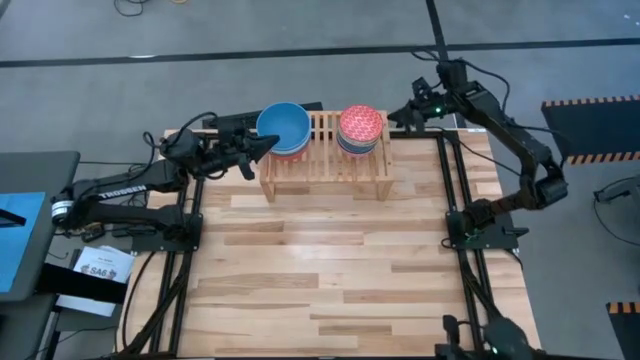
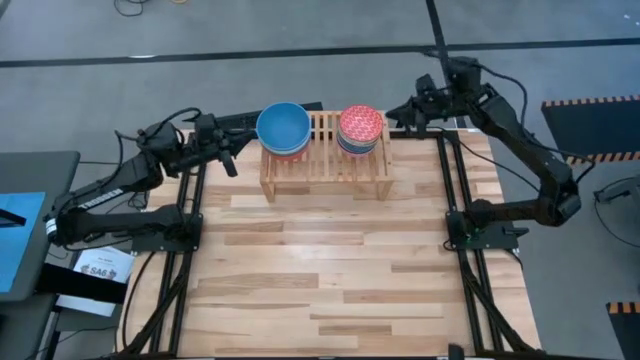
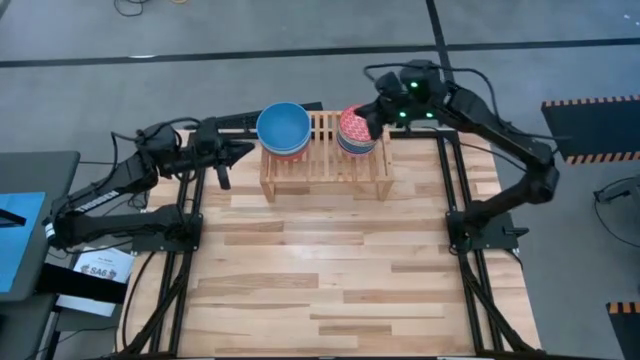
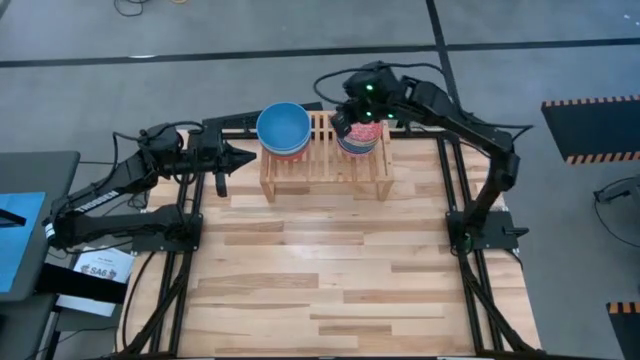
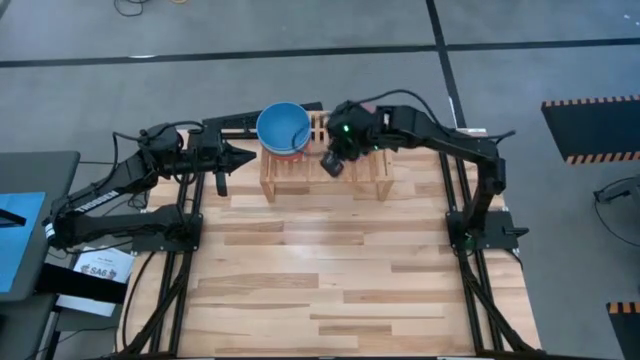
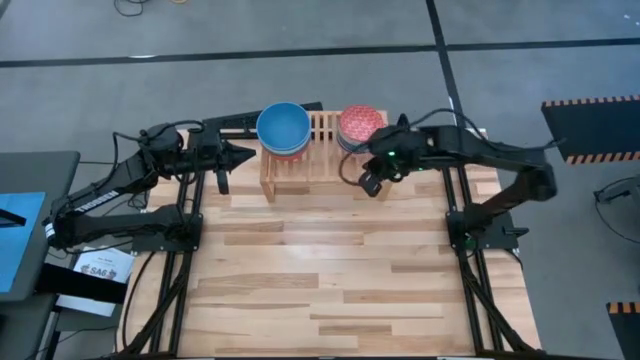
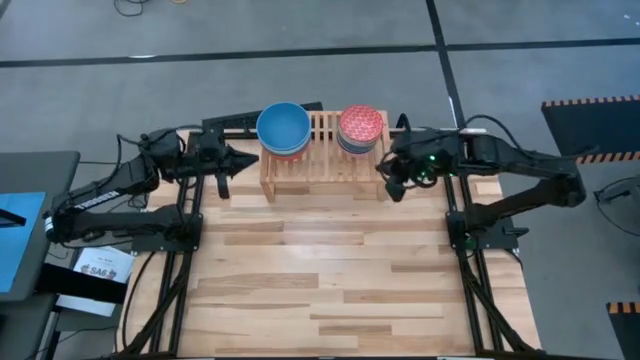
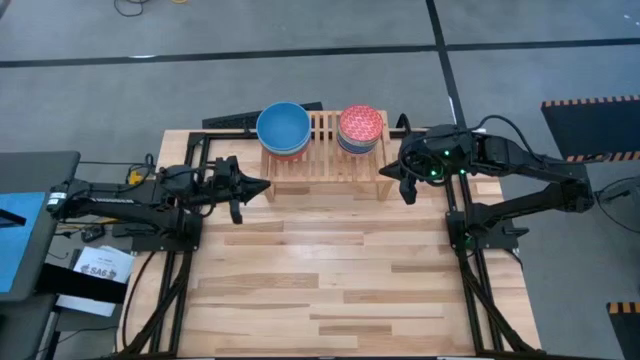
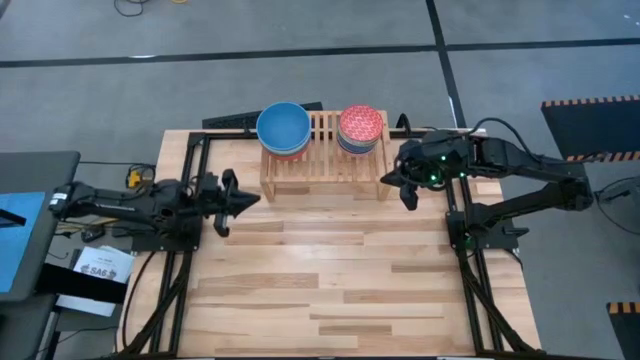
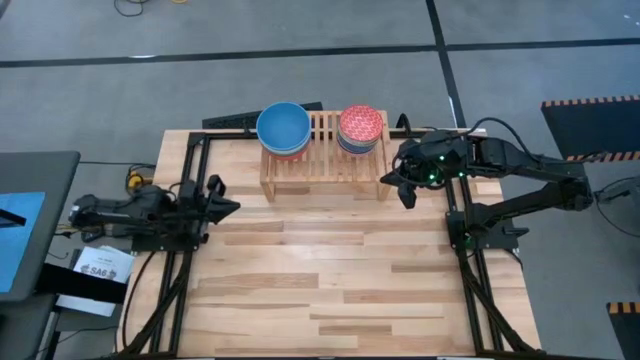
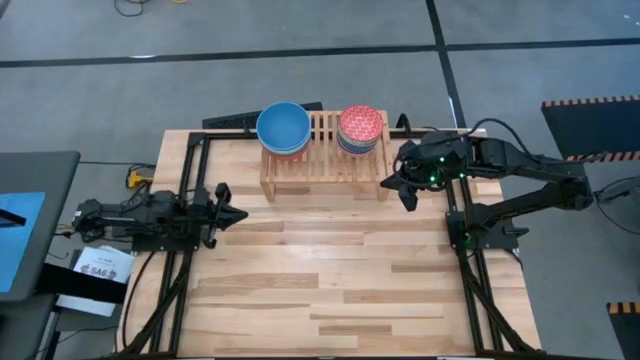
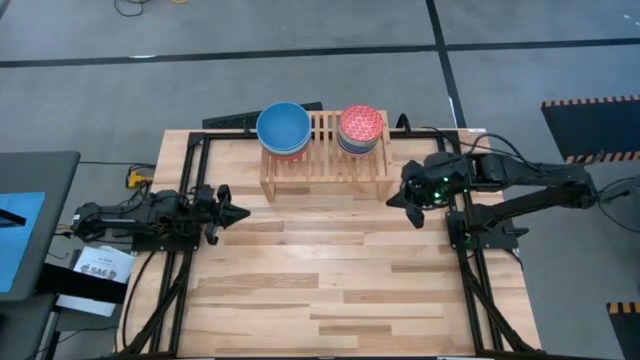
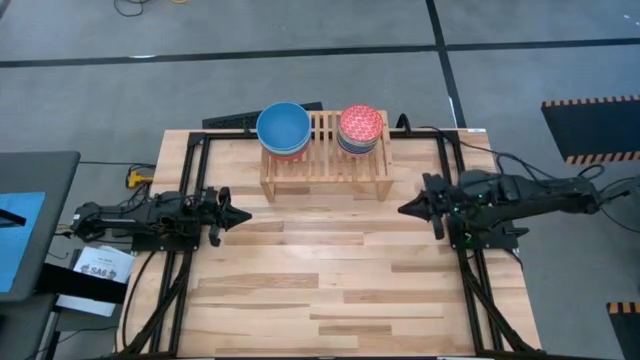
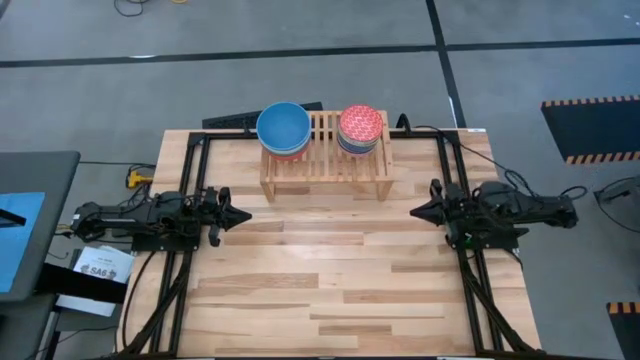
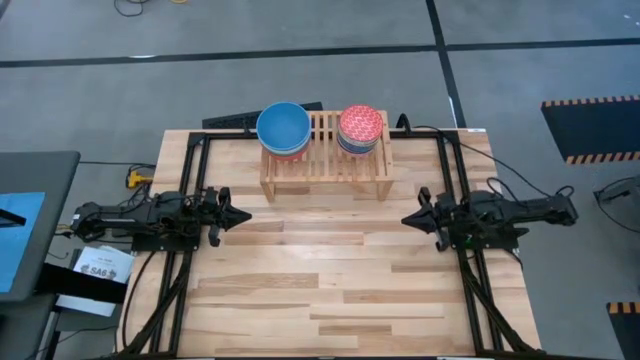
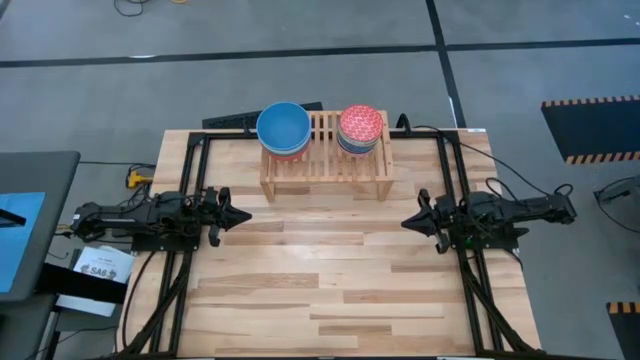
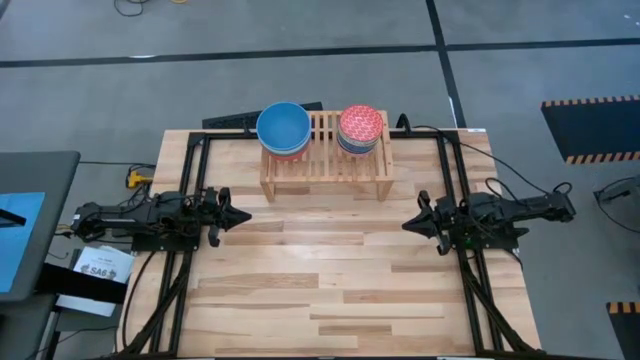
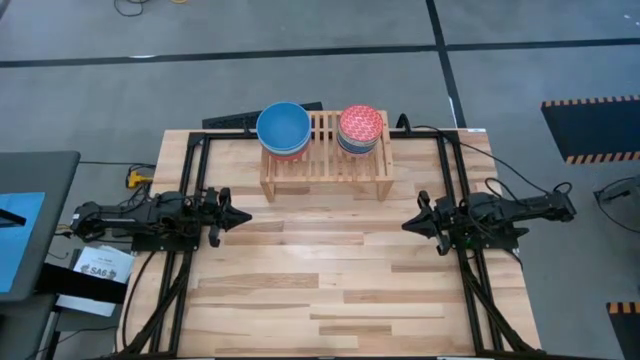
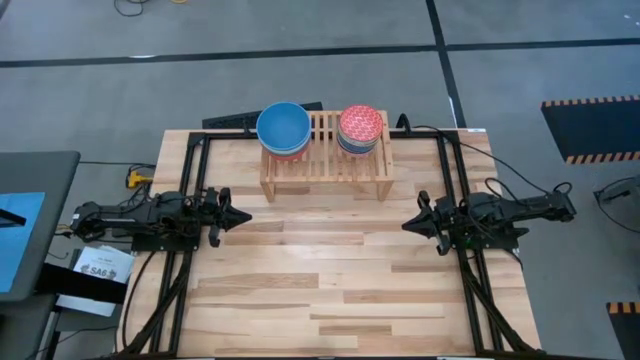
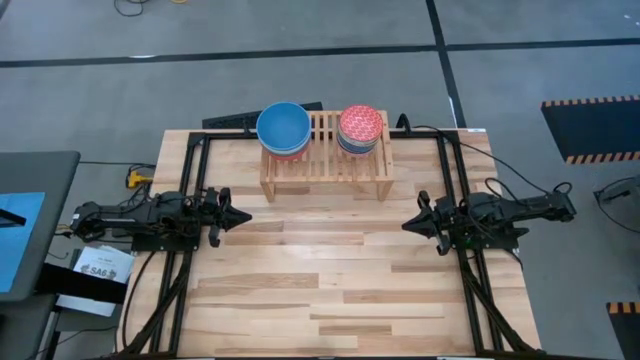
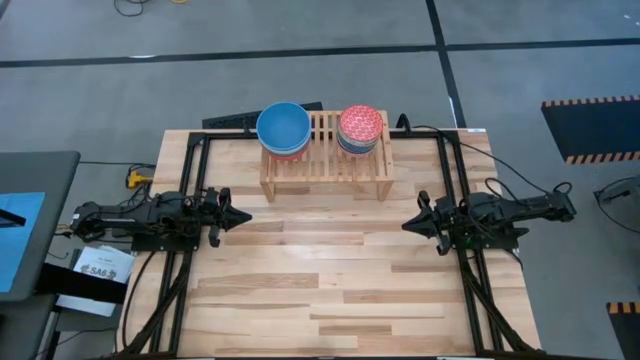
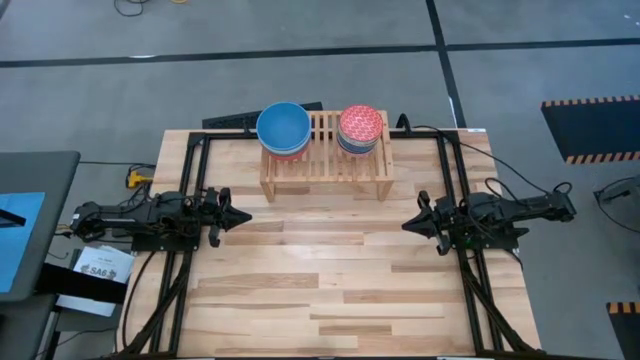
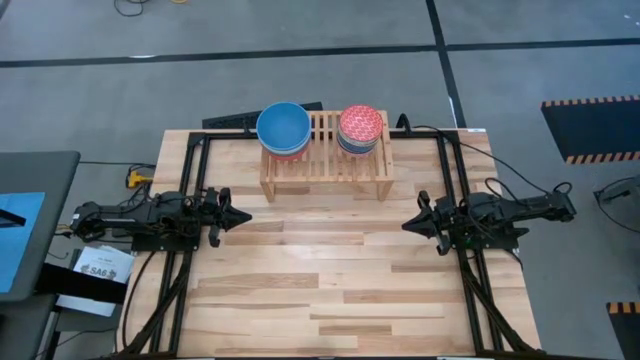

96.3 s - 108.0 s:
Task: Place and stack bowls onto a shelf
Return to Home Position

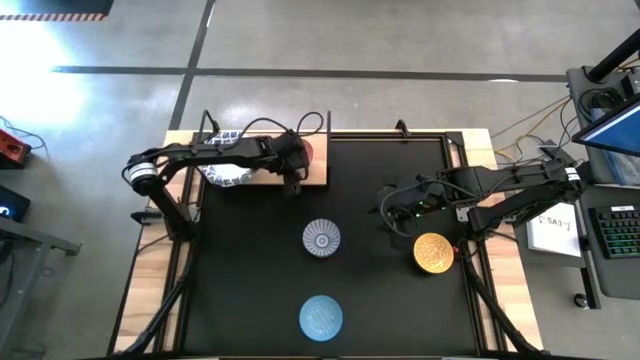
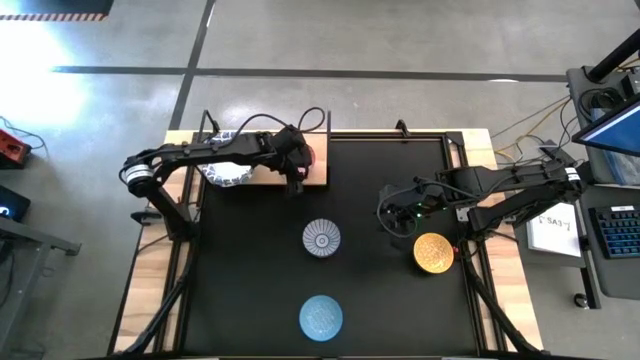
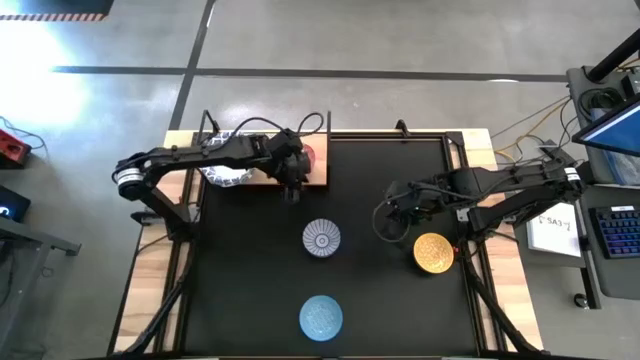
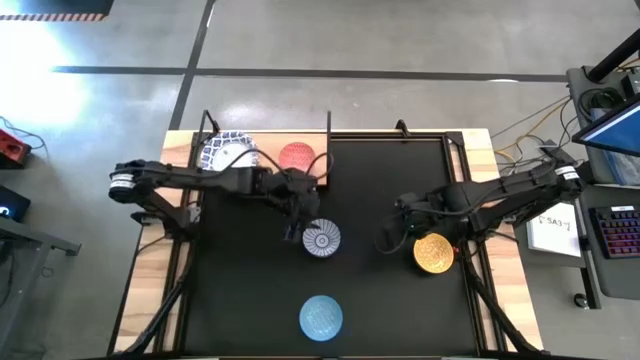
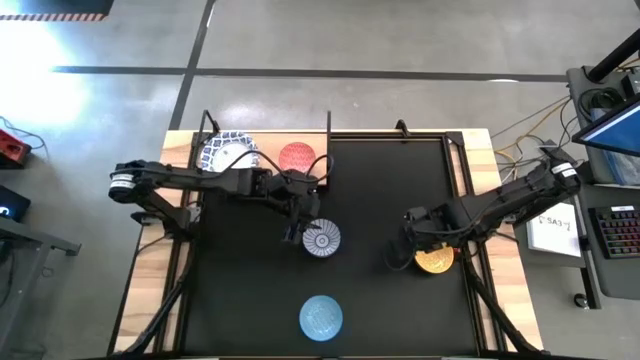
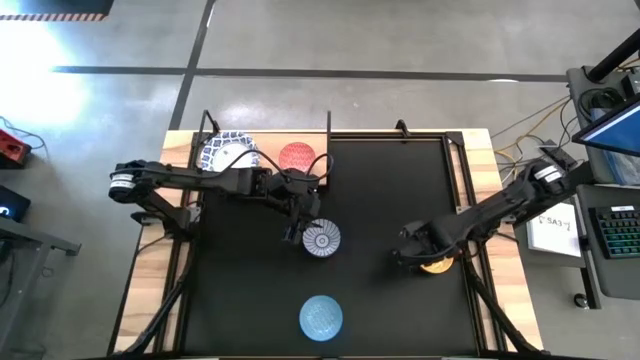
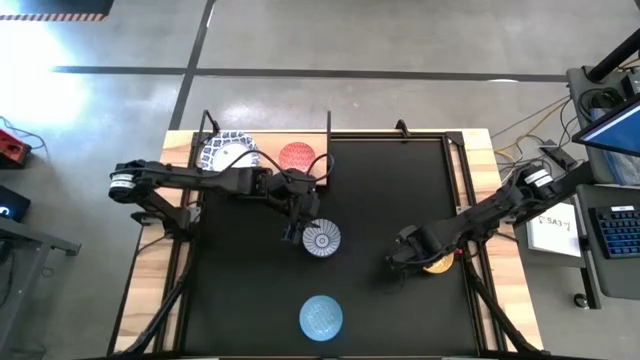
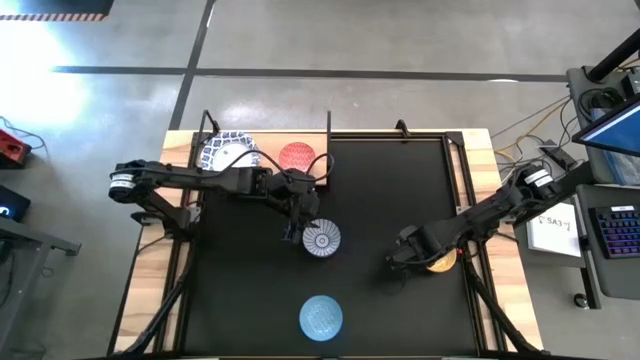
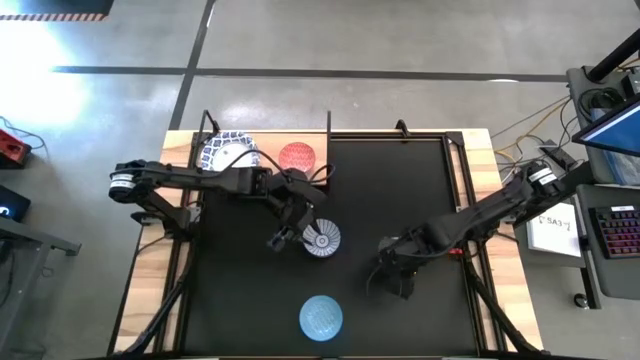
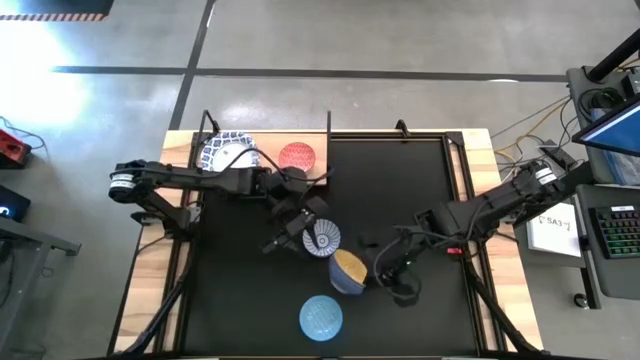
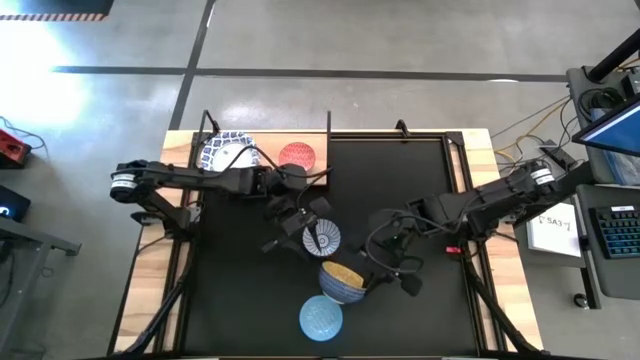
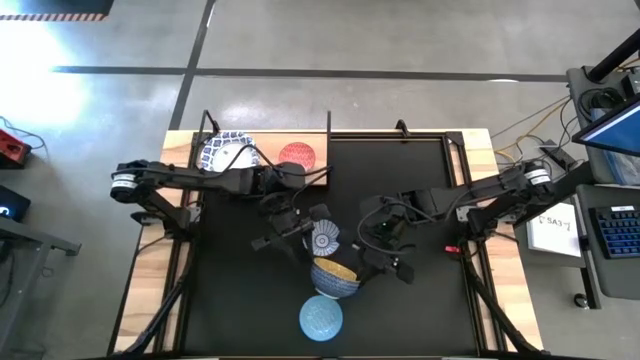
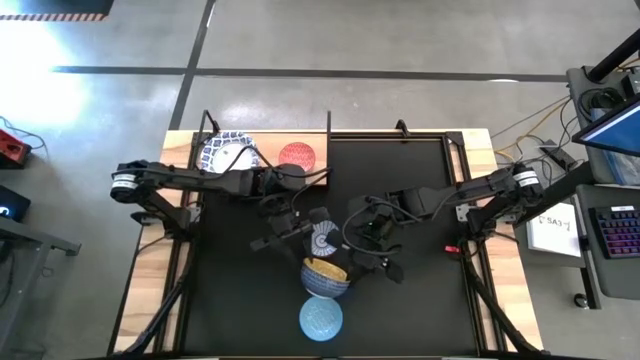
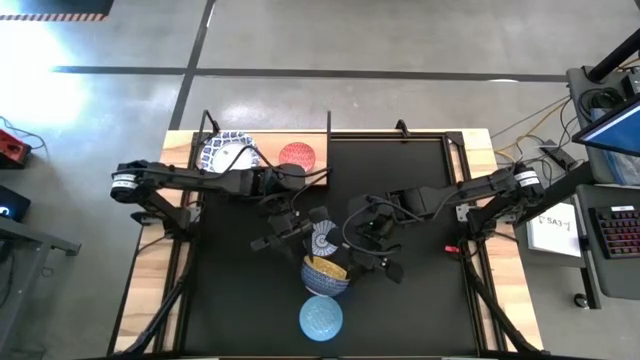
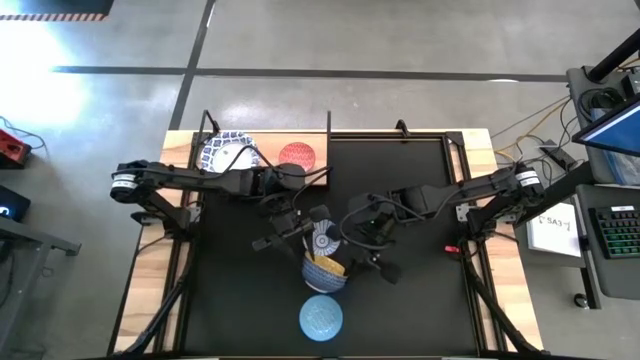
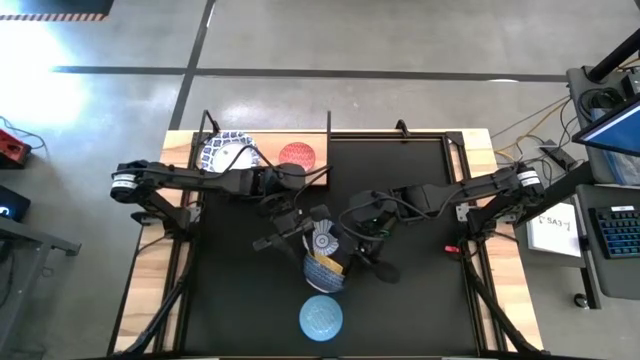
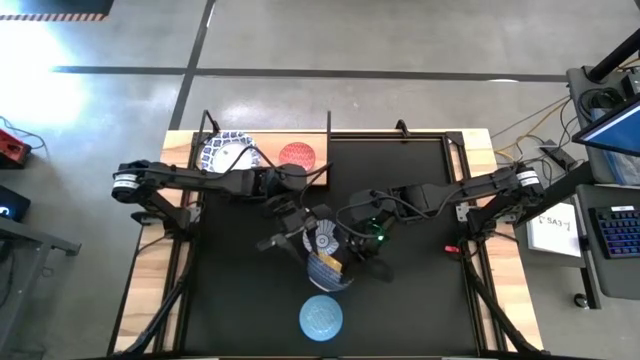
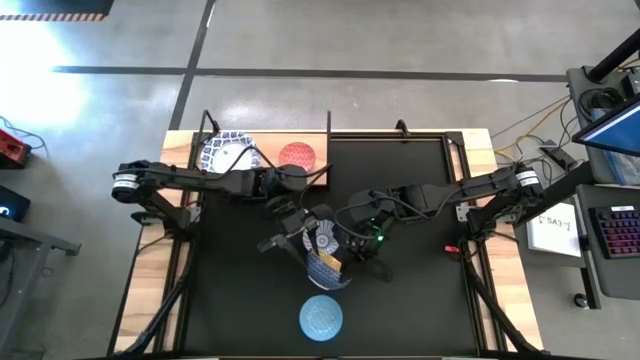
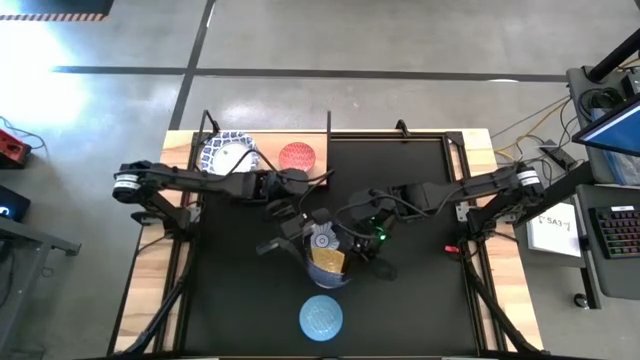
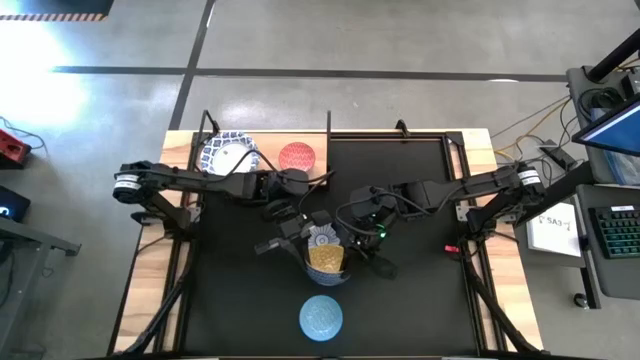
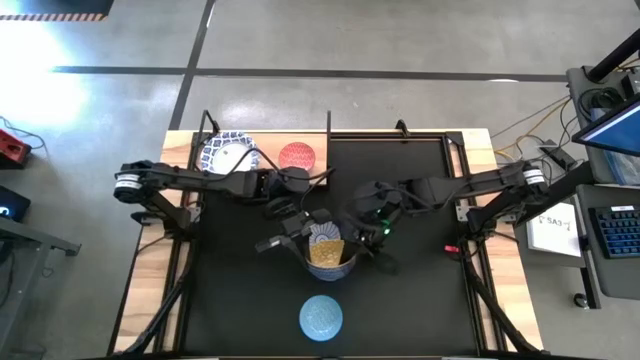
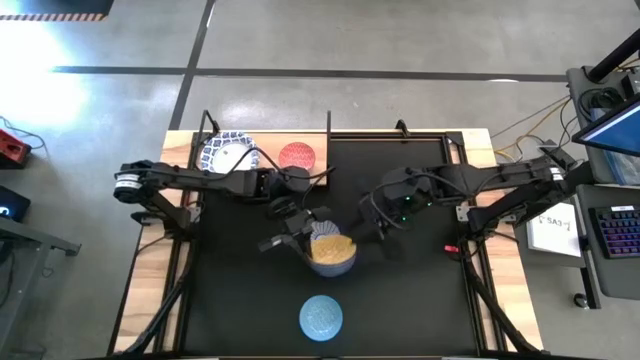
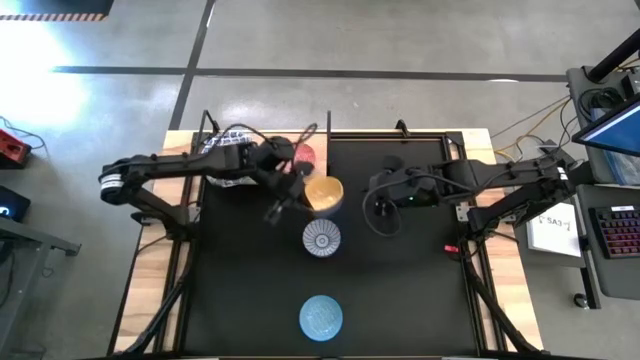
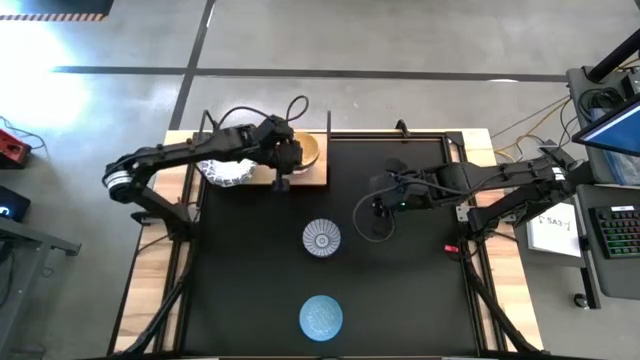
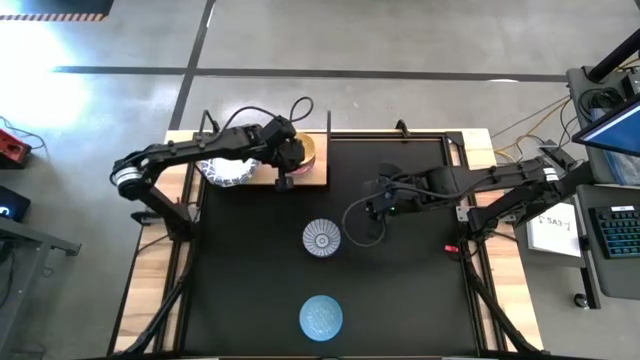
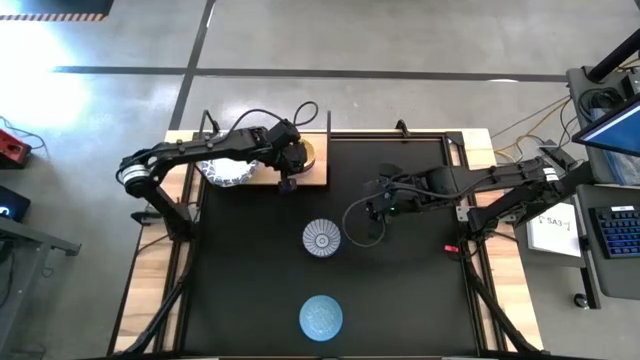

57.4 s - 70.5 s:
Task: Place and stack bowls onto a shelf
Stack the yellow patterned bowl on top of the red patterned bowl on the shelf
